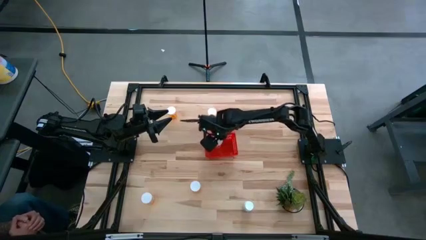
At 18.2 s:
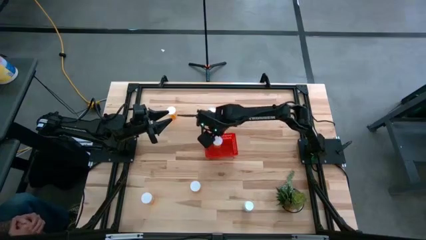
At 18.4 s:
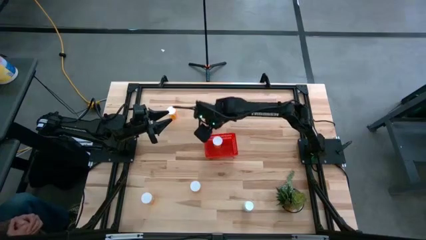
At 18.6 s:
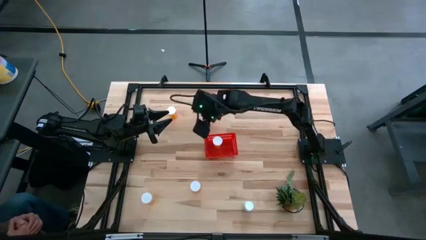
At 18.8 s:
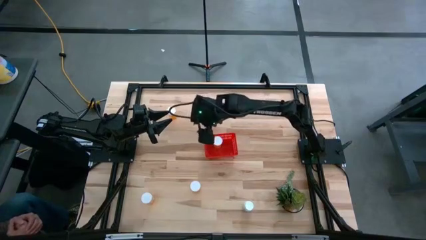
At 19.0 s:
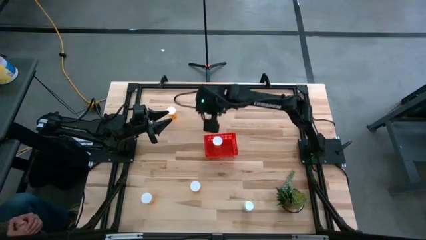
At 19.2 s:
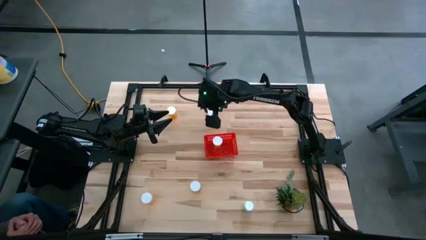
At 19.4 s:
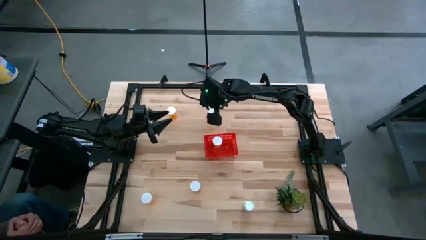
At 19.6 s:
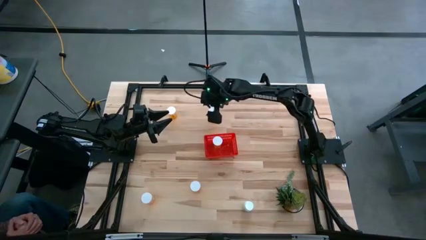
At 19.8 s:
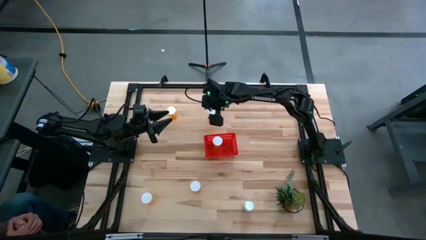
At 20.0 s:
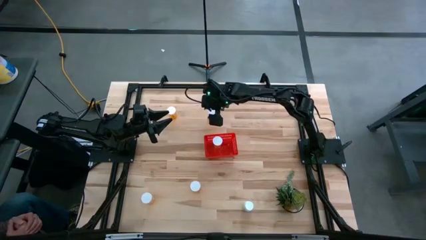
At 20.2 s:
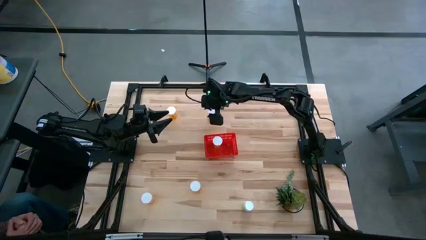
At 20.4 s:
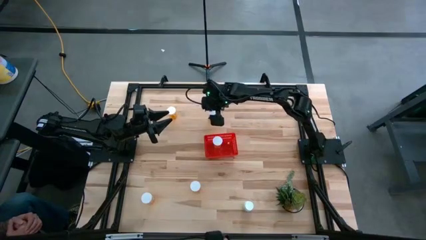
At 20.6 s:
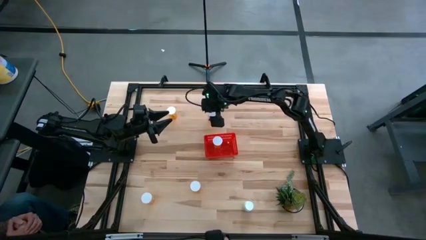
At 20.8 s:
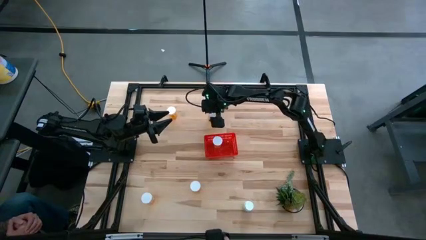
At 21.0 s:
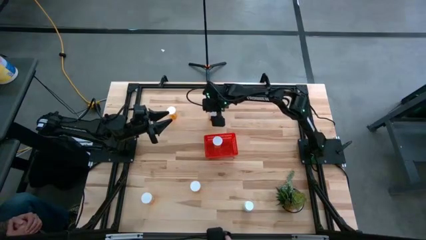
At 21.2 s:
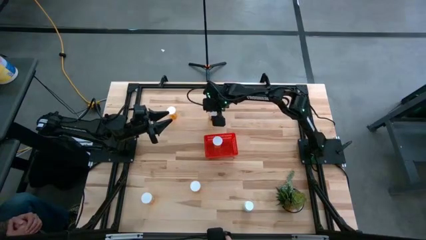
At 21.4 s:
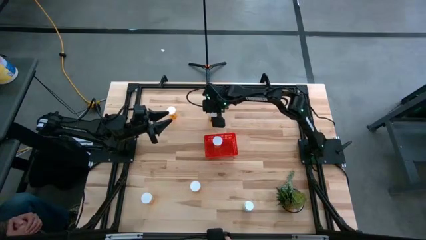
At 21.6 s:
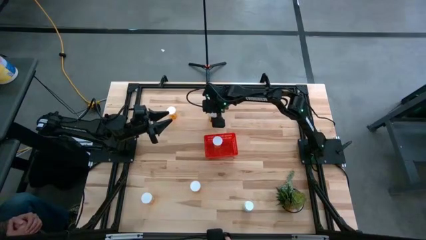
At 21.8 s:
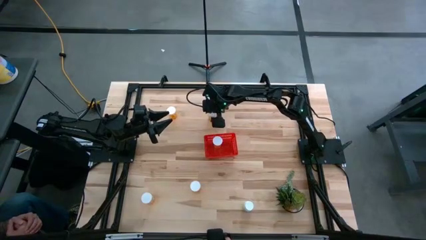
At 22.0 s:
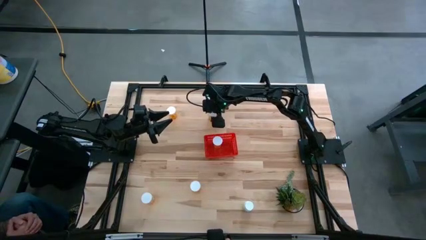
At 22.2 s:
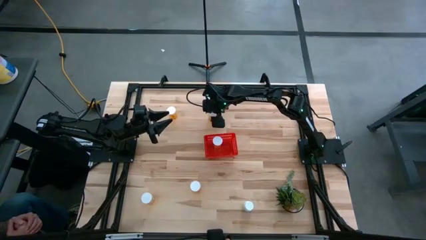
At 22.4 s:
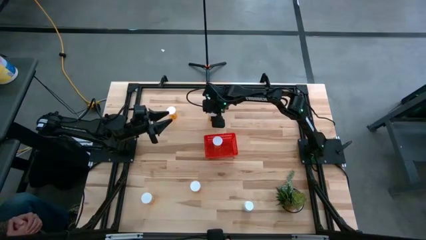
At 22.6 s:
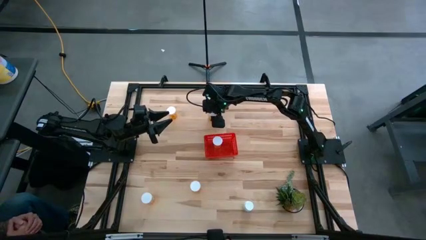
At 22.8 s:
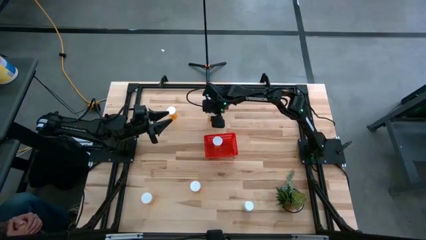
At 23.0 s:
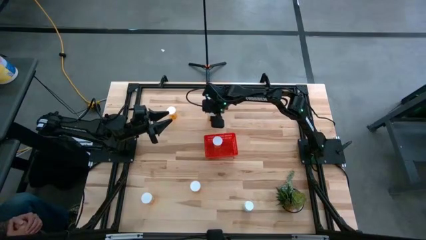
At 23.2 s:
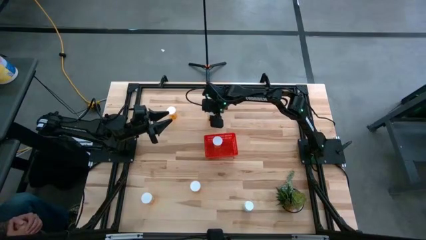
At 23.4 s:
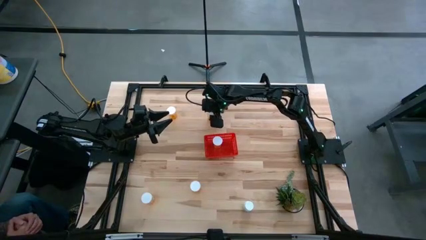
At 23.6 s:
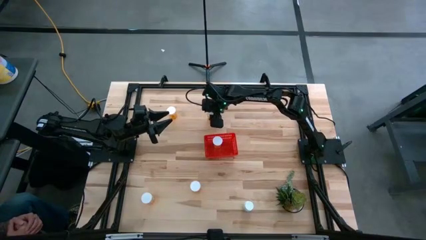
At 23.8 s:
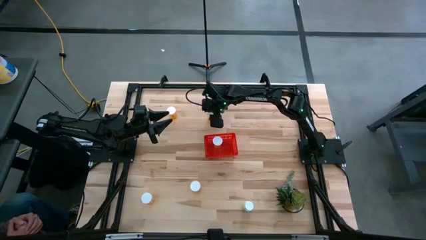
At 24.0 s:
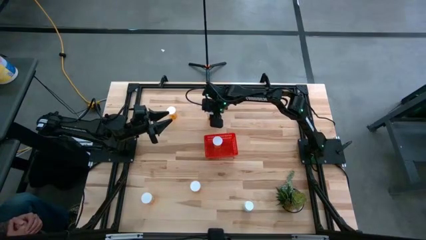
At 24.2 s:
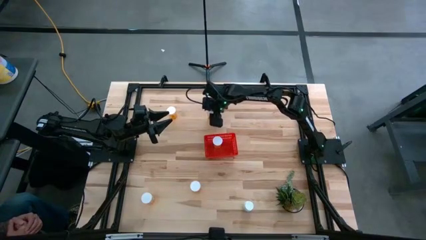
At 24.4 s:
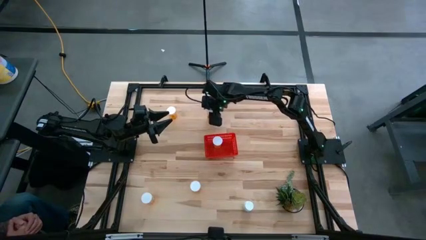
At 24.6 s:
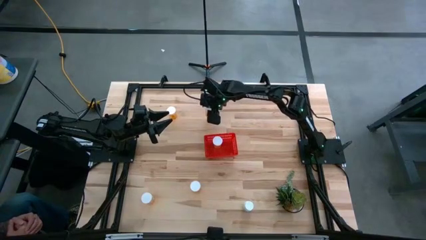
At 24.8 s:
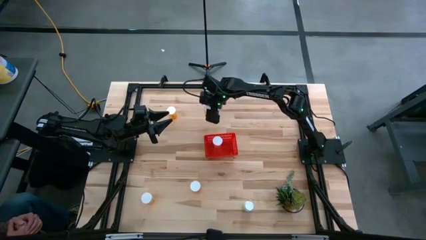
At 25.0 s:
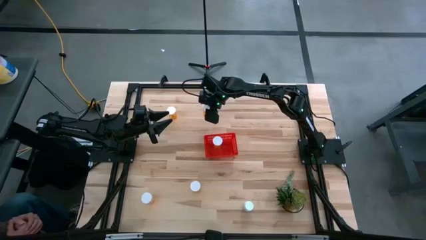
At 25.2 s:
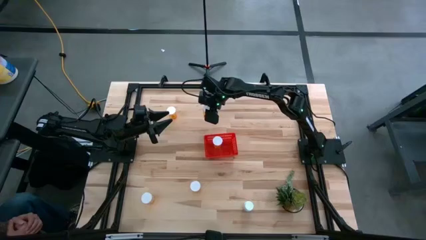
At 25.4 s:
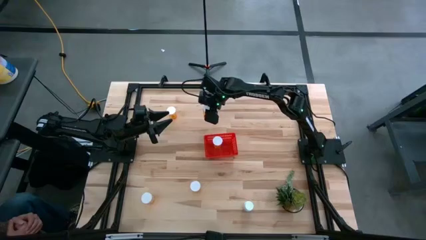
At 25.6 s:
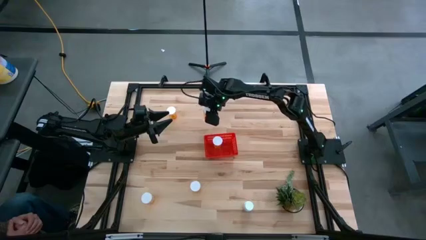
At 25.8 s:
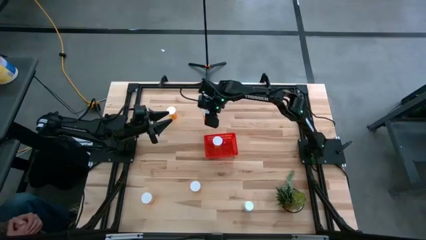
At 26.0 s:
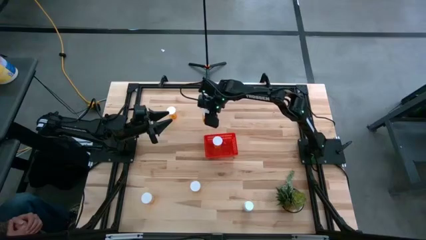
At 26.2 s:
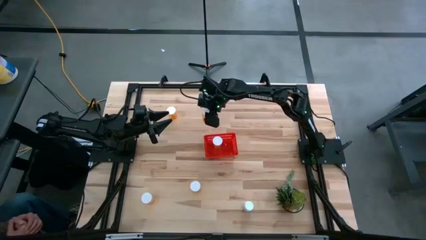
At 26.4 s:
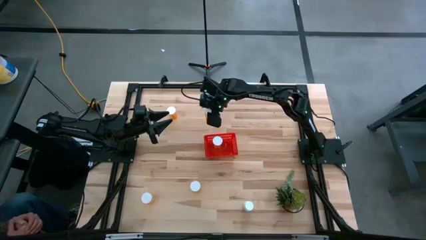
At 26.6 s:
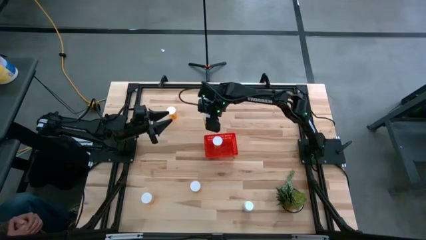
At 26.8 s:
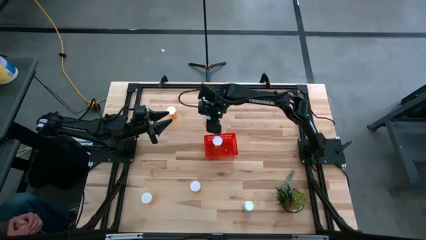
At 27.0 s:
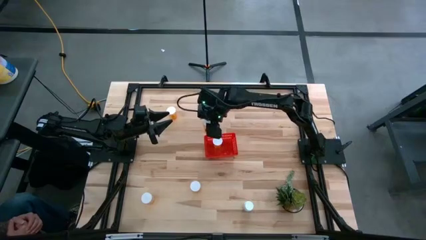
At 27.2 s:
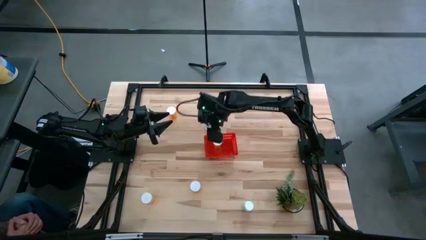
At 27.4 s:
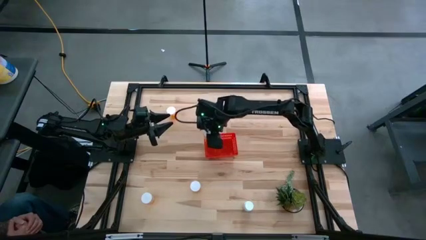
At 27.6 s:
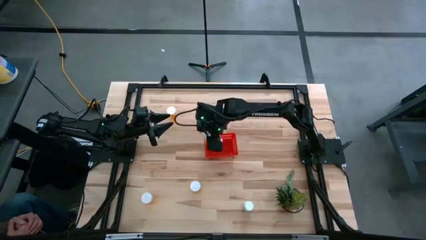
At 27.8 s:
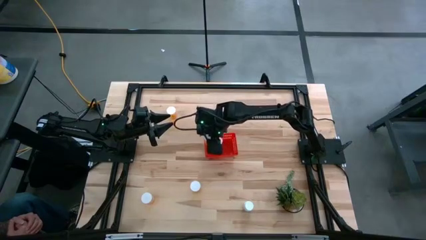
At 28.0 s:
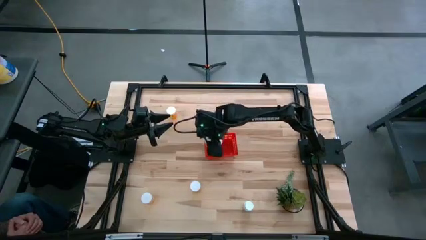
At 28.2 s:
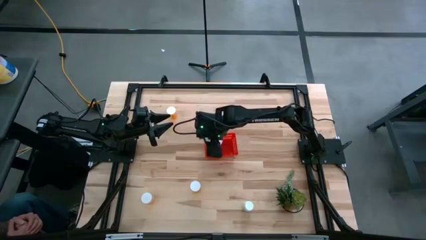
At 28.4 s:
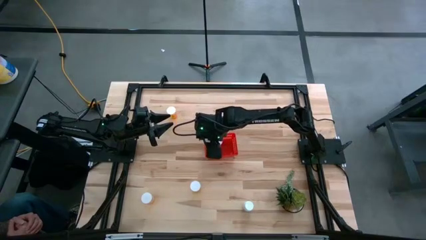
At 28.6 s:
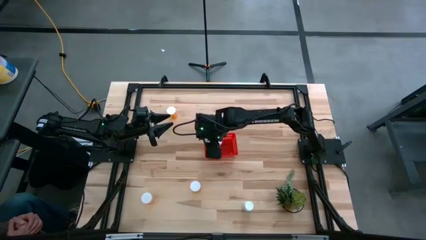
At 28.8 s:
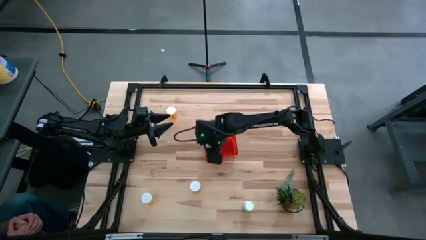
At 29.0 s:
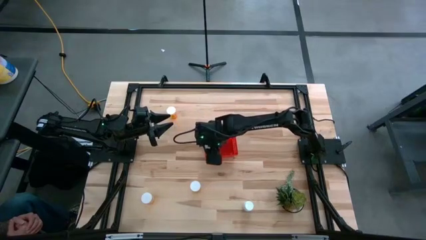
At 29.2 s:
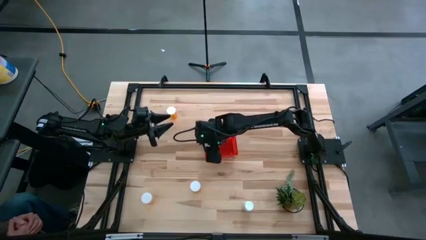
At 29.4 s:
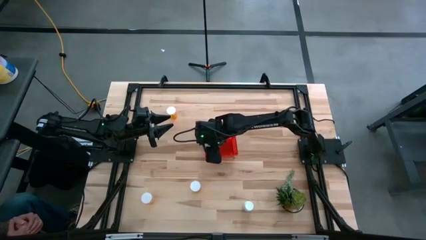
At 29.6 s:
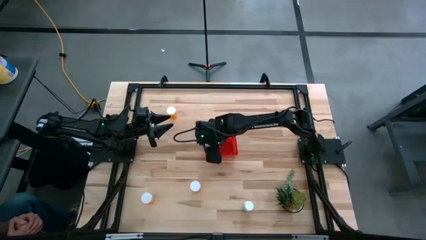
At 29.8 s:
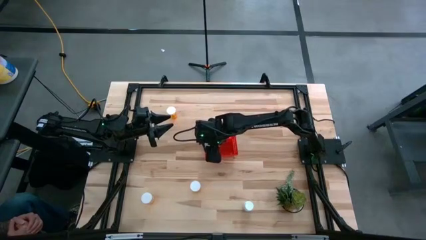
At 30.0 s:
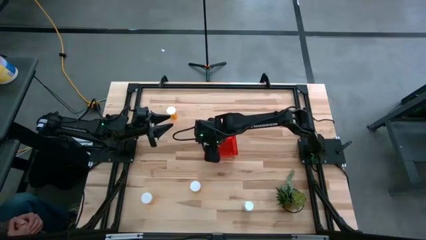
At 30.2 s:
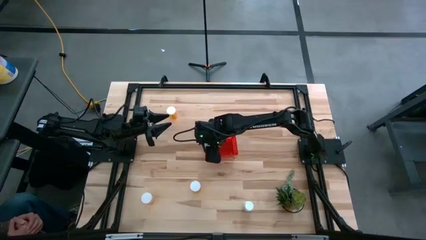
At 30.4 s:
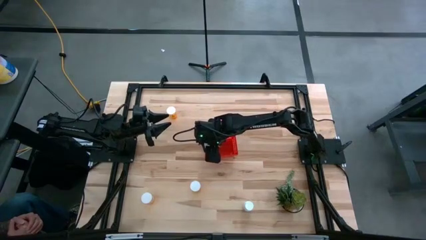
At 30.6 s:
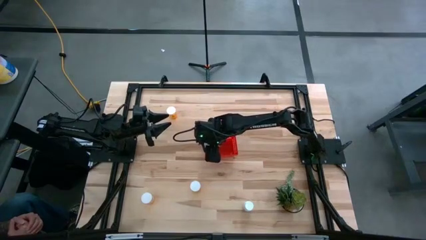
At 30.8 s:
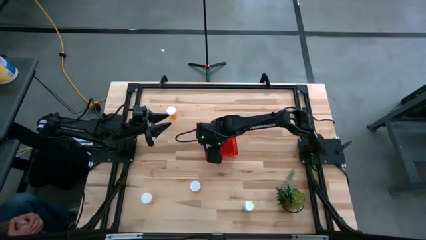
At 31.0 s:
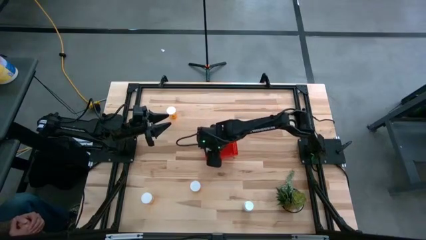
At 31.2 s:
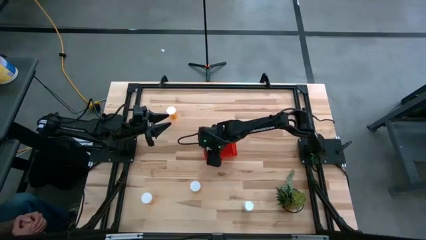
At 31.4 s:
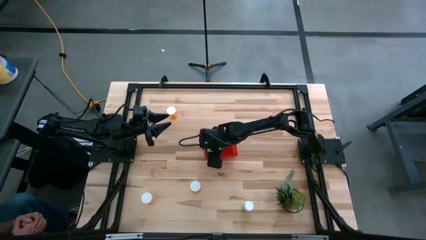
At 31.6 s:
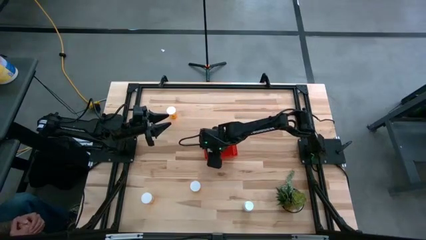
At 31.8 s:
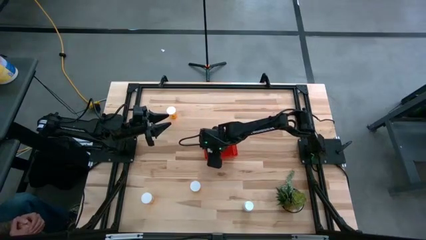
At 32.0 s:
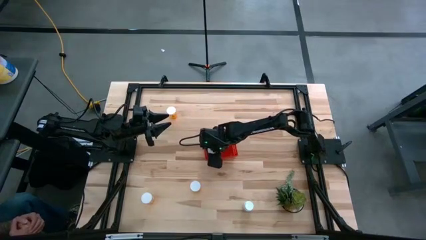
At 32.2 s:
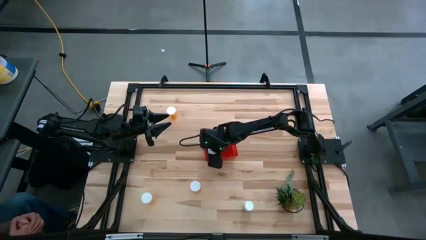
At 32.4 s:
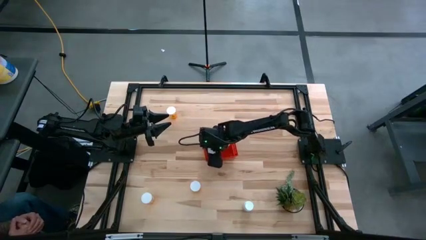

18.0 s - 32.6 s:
Task: Pick and place pill bottles into a basket
Put the orange medicine bottle into the bin
